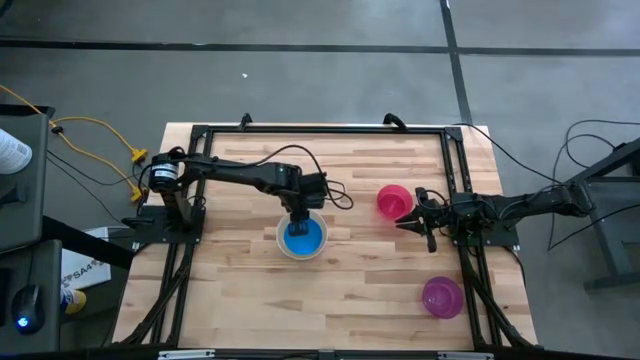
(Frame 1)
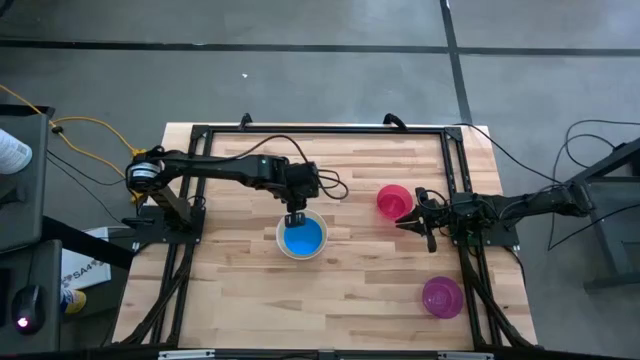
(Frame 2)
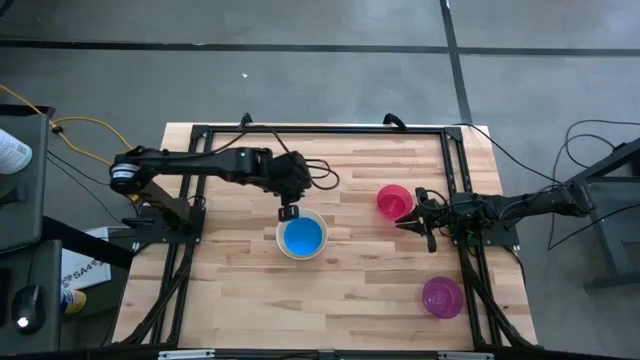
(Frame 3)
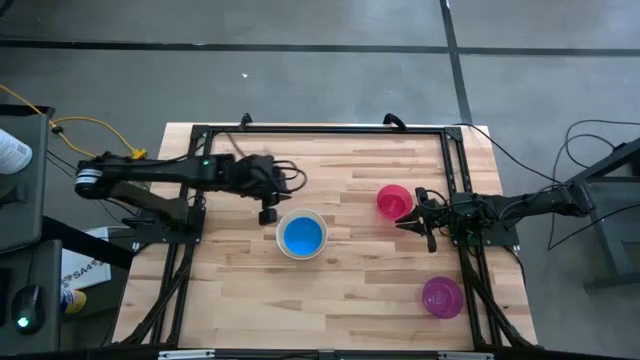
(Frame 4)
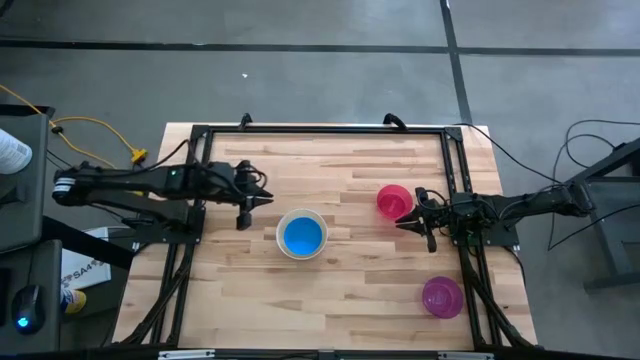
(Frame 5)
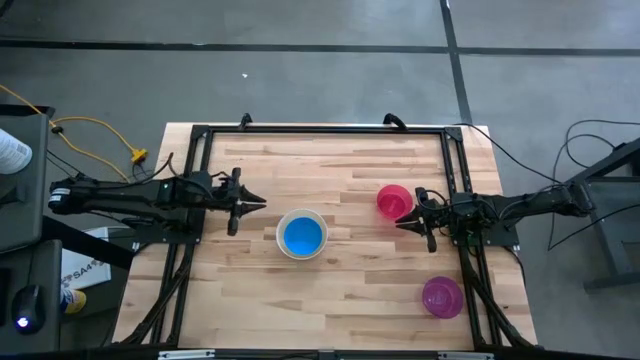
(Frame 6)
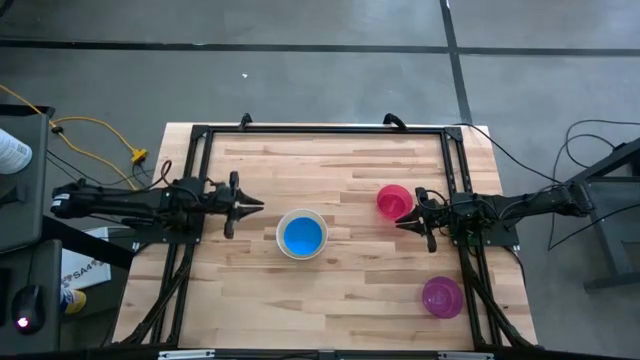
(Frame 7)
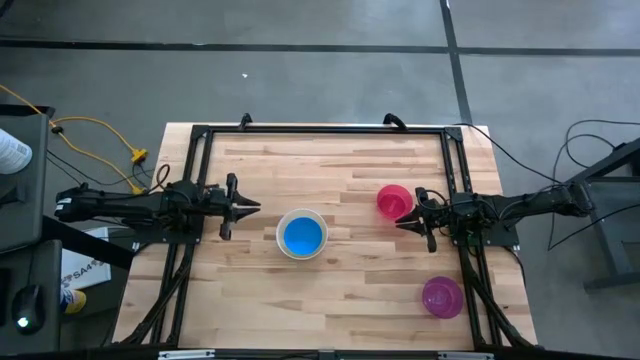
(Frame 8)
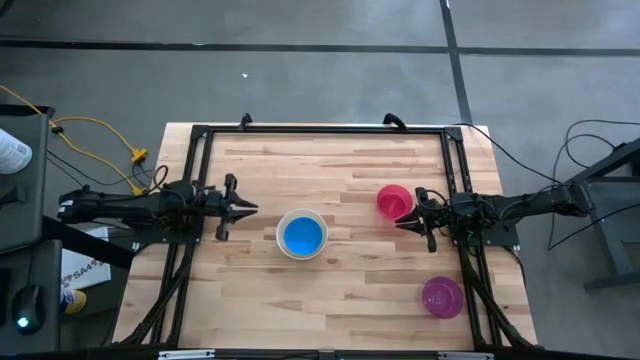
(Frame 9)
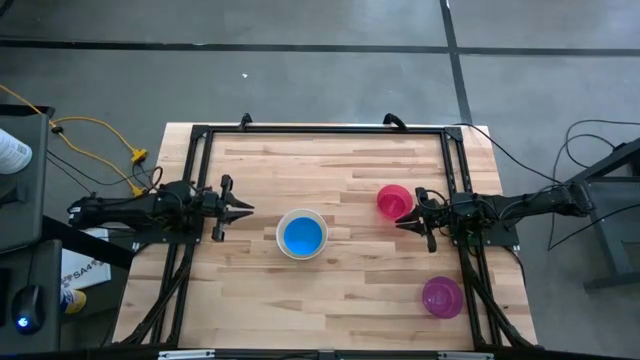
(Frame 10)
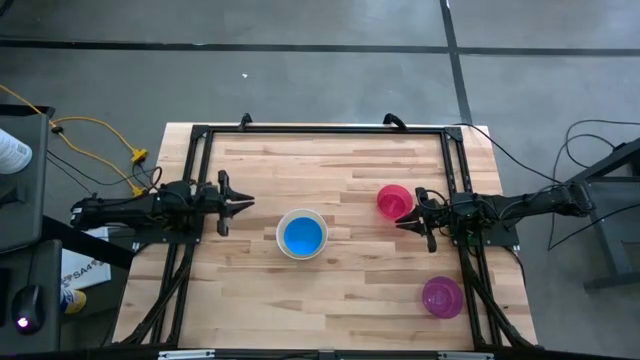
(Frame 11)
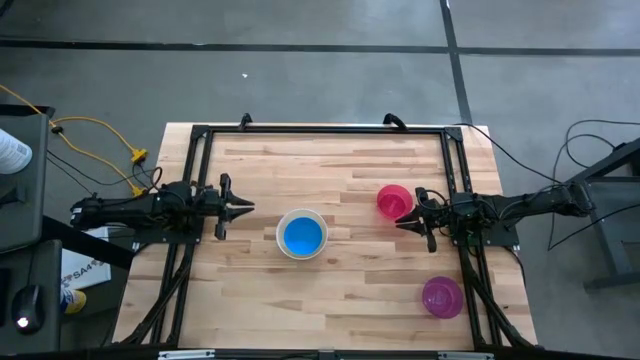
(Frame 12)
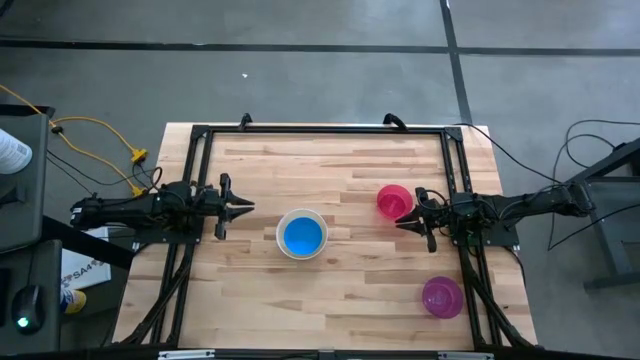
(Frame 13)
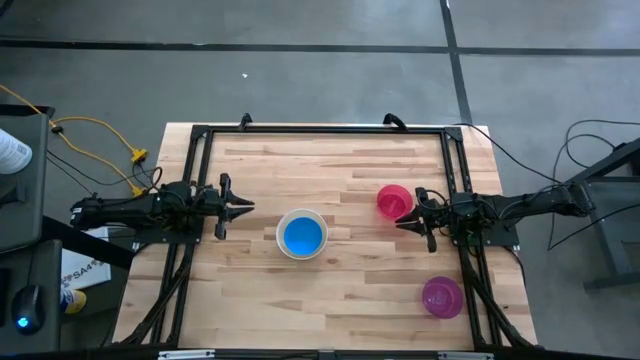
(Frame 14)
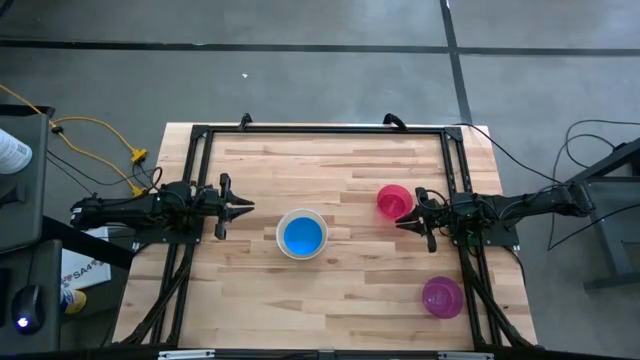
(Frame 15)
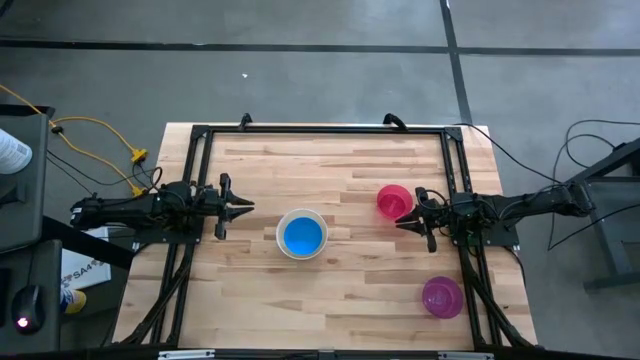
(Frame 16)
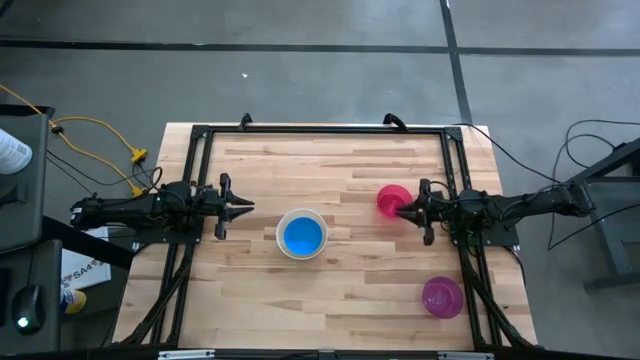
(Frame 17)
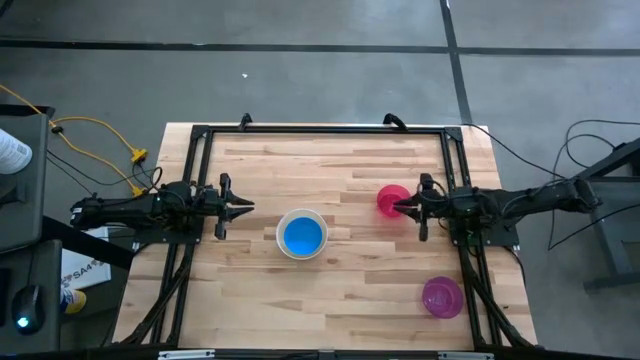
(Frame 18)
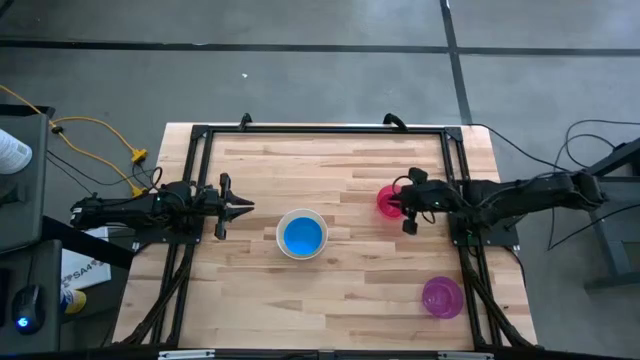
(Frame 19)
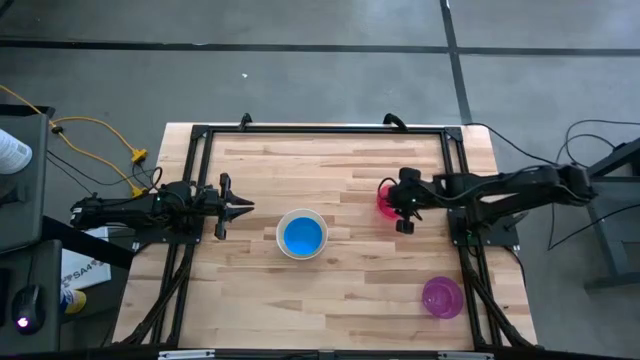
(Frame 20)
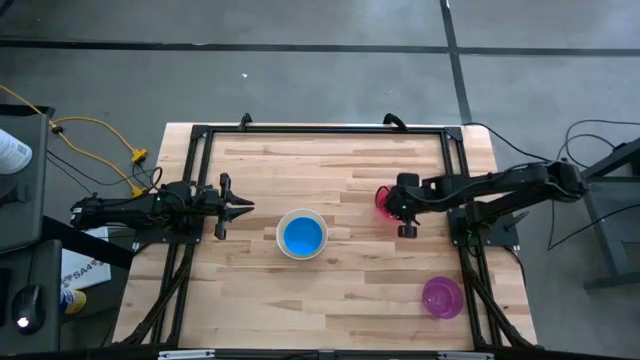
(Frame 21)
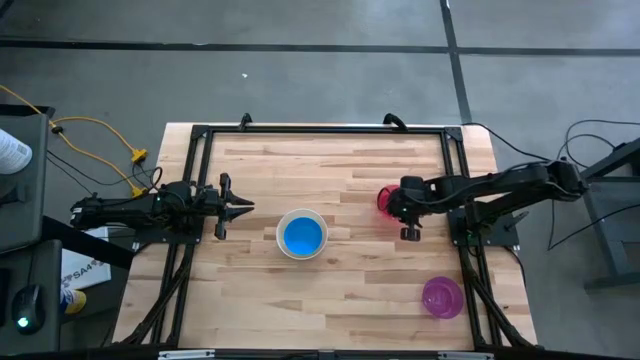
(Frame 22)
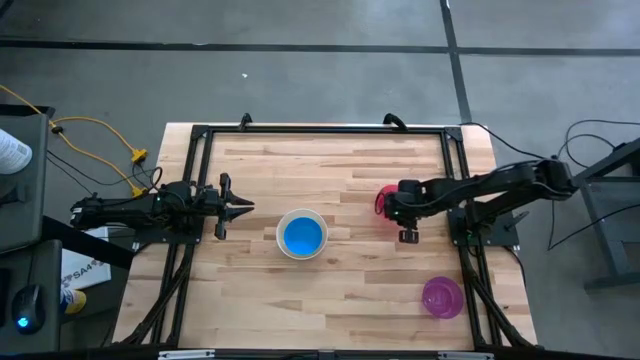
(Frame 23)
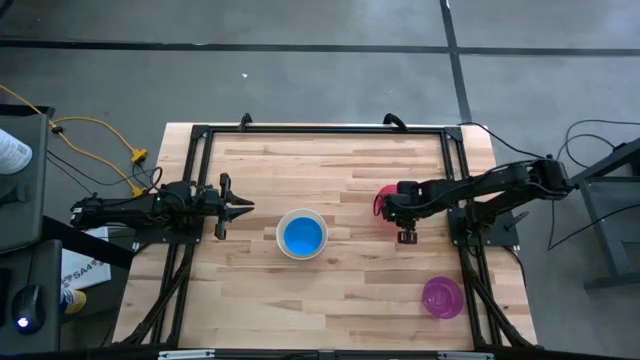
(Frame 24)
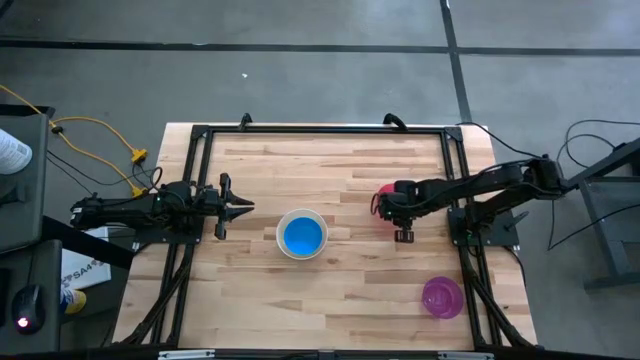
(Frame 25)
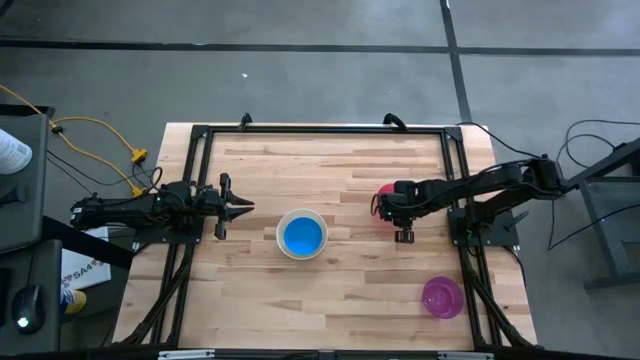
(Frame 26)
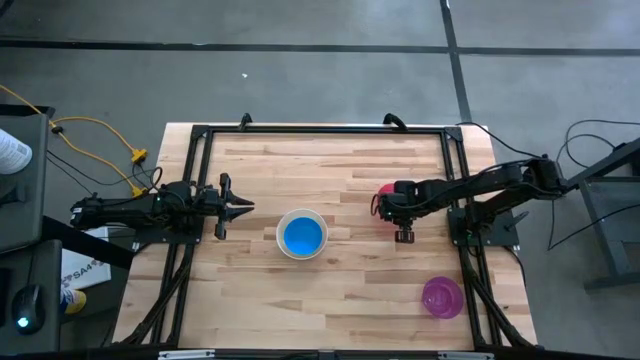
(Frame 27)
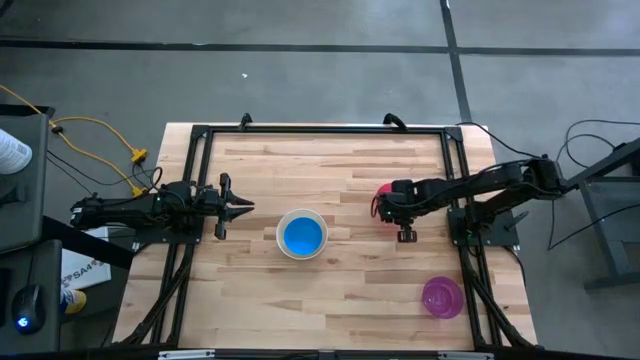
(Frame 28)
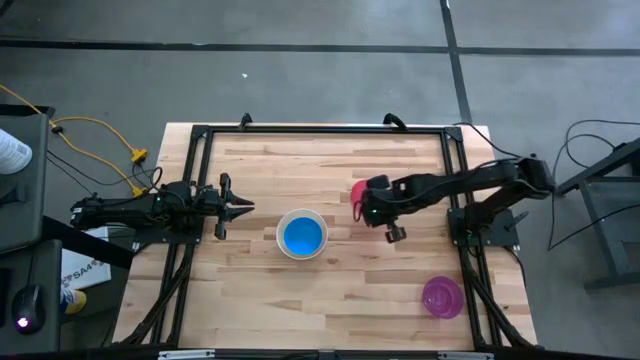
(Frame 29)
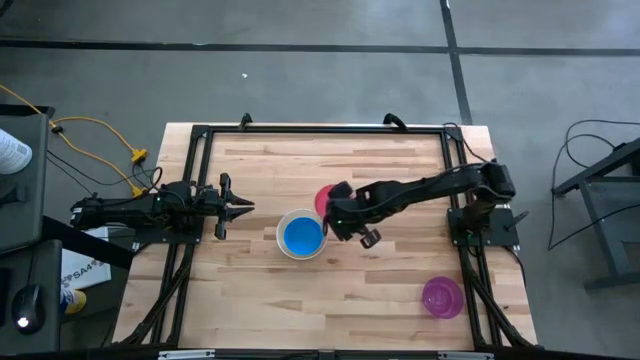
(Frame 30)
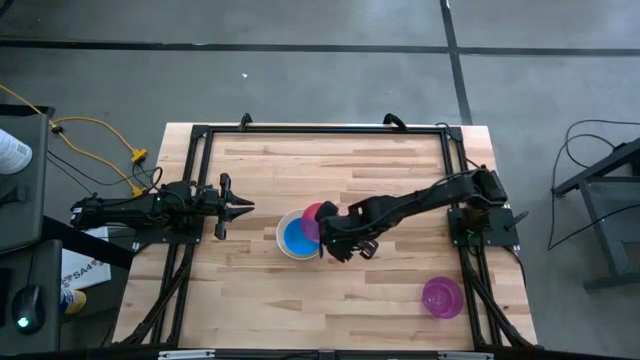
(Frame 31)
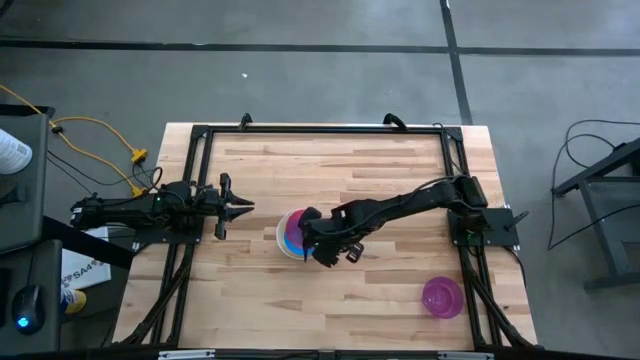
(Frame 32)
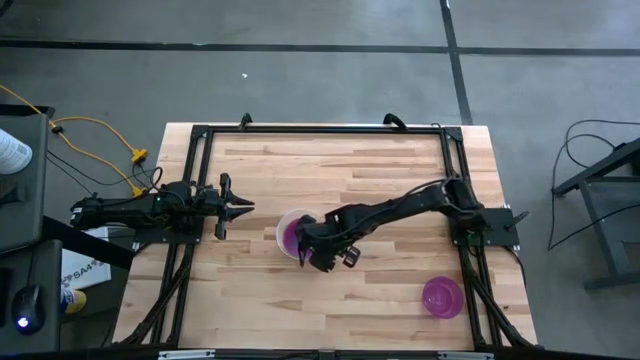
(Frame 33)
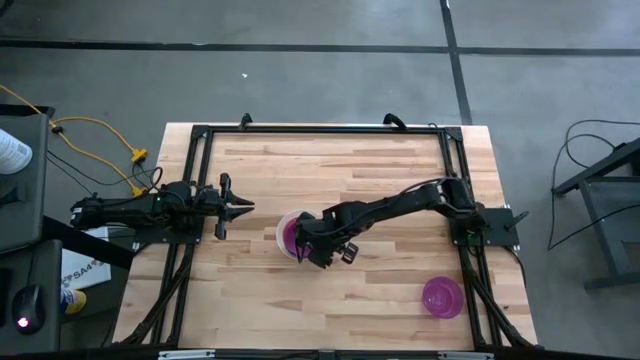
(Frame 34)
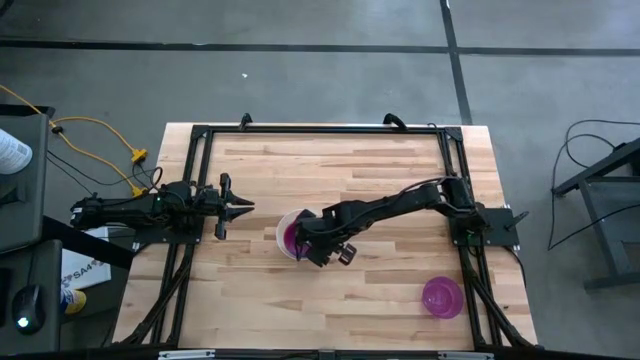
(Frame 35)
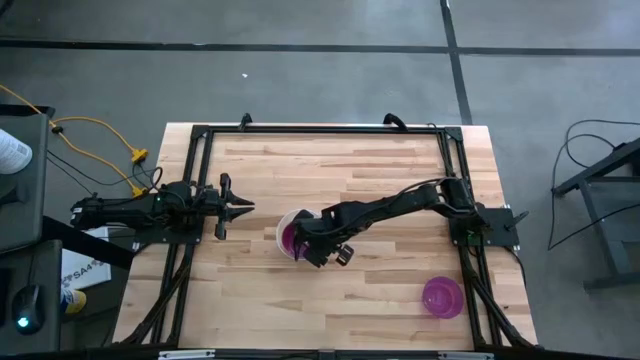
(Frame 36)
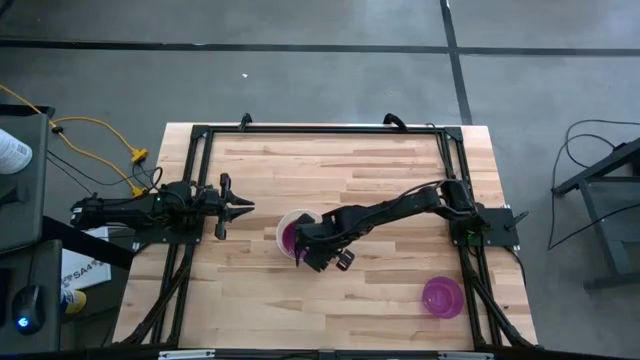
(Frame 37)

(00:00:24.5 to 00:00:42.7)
Stack the pink bowl on top of the blue bowl on the table
